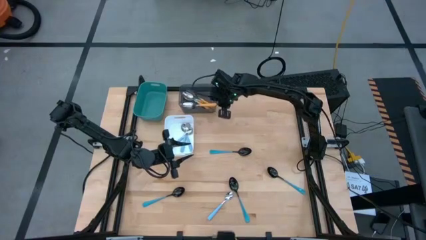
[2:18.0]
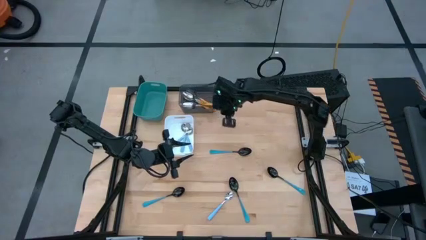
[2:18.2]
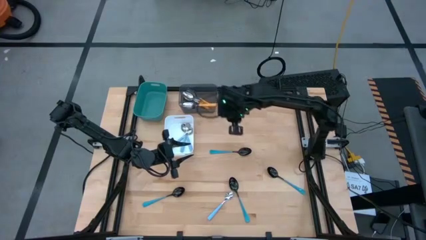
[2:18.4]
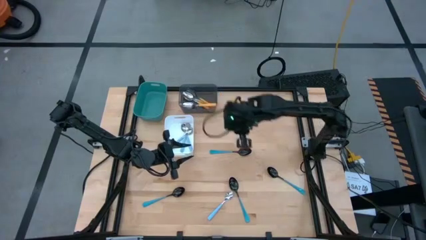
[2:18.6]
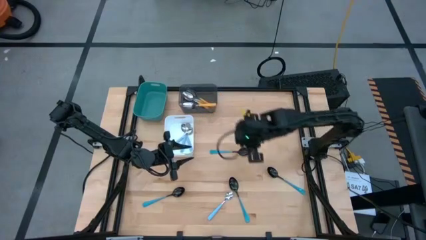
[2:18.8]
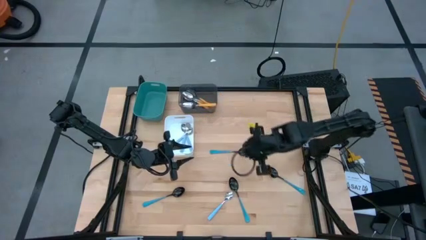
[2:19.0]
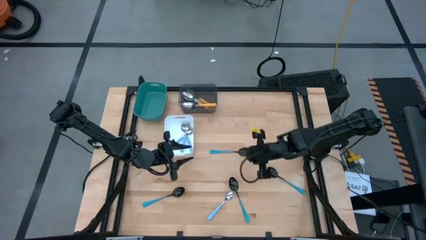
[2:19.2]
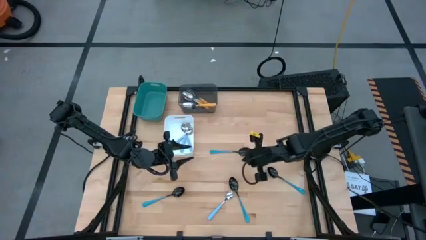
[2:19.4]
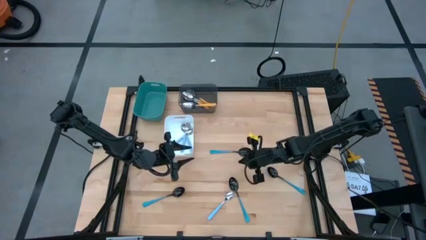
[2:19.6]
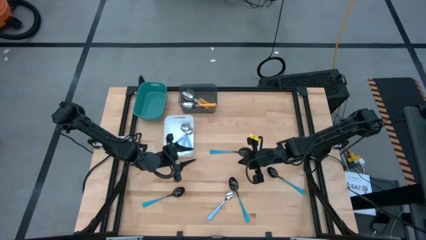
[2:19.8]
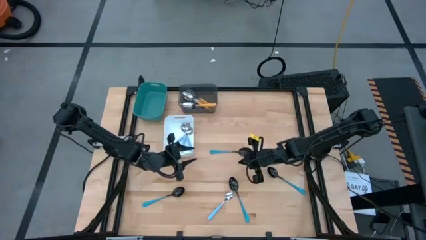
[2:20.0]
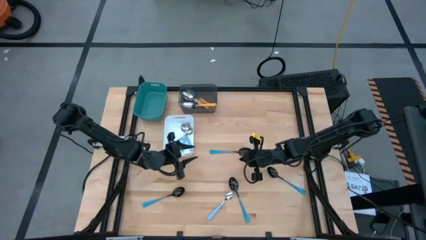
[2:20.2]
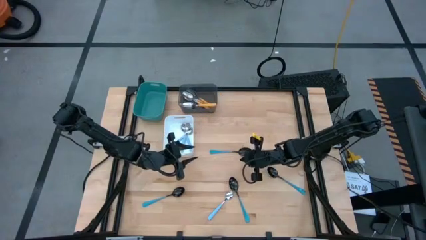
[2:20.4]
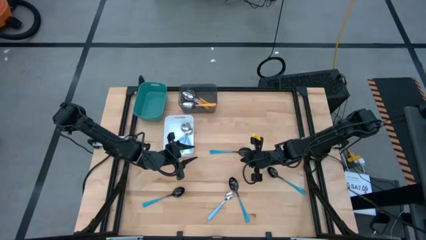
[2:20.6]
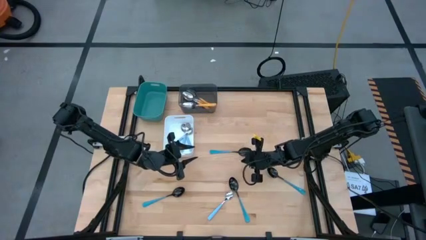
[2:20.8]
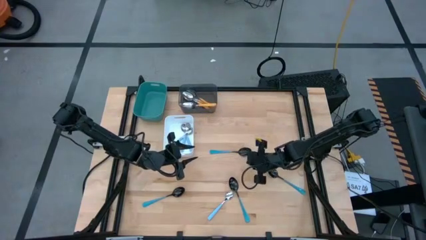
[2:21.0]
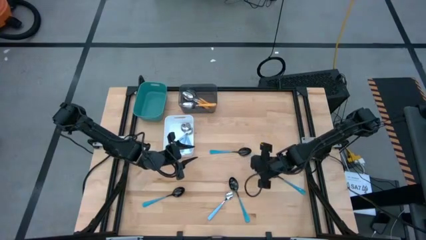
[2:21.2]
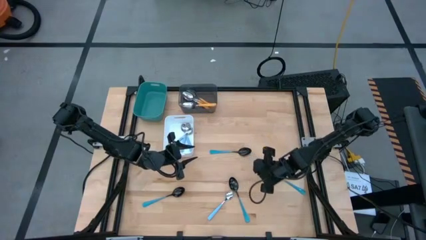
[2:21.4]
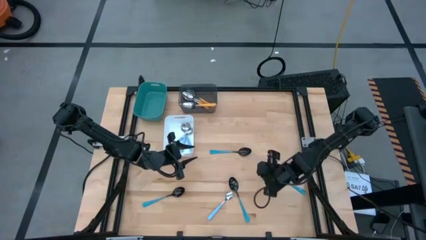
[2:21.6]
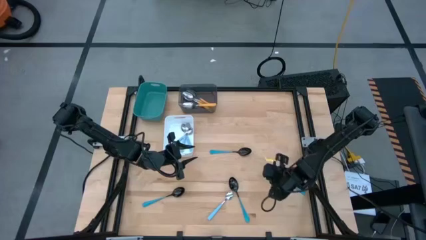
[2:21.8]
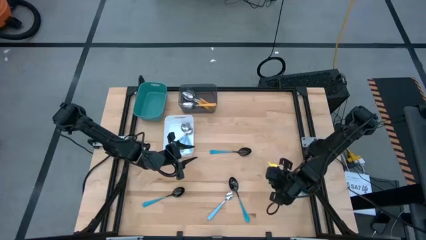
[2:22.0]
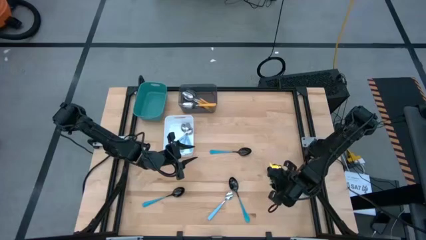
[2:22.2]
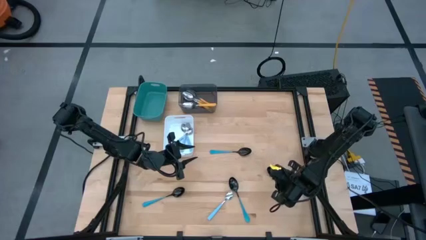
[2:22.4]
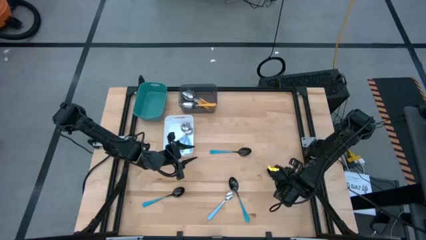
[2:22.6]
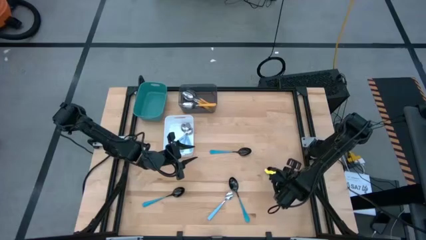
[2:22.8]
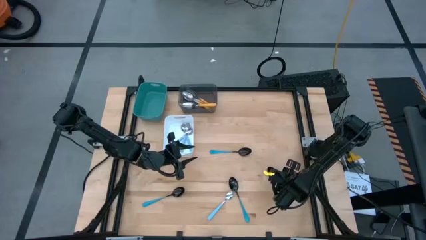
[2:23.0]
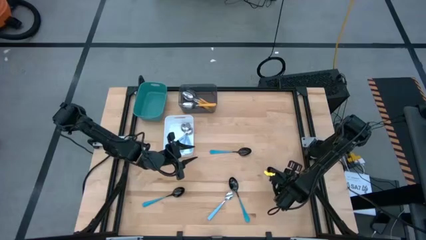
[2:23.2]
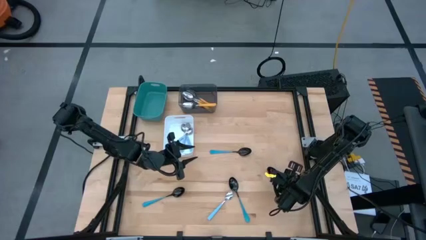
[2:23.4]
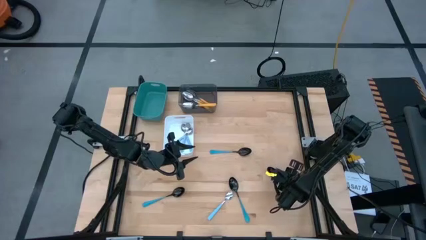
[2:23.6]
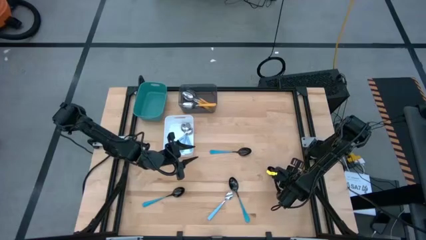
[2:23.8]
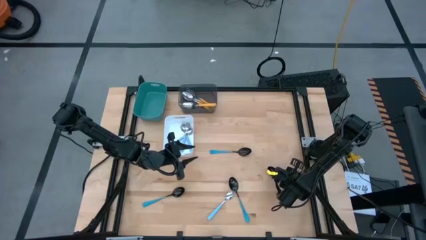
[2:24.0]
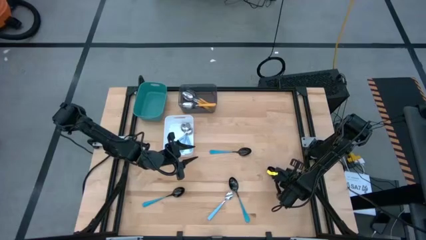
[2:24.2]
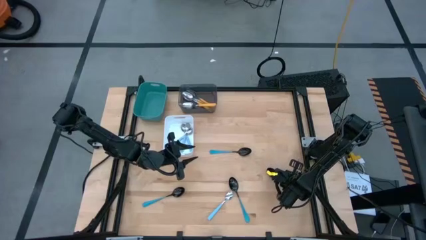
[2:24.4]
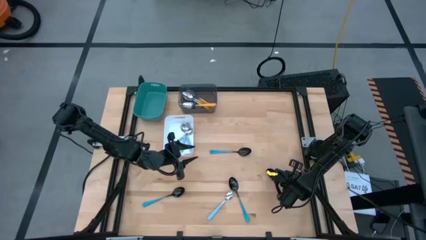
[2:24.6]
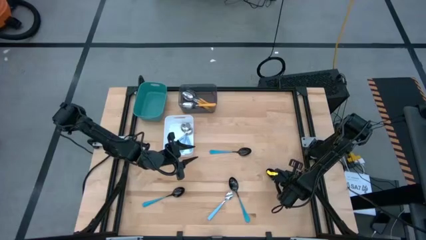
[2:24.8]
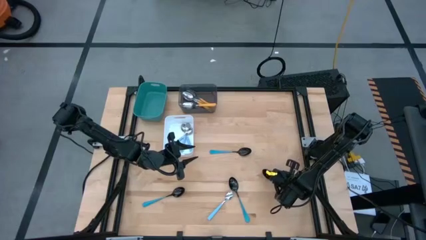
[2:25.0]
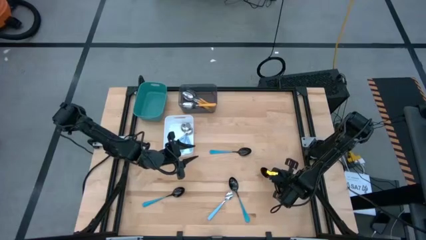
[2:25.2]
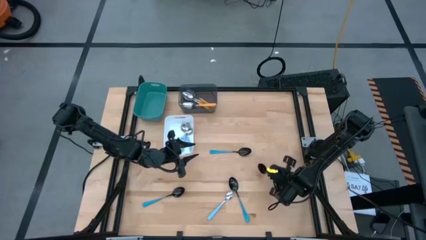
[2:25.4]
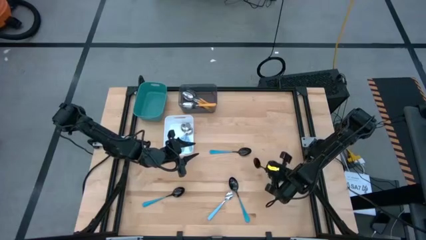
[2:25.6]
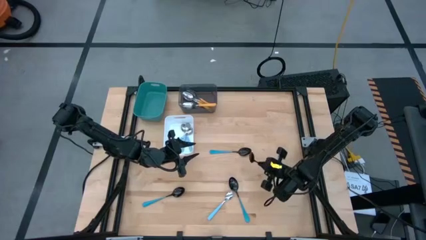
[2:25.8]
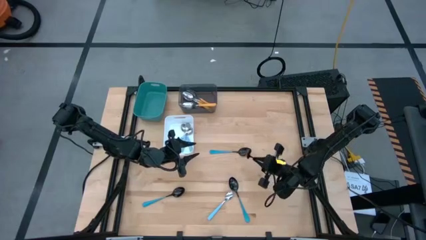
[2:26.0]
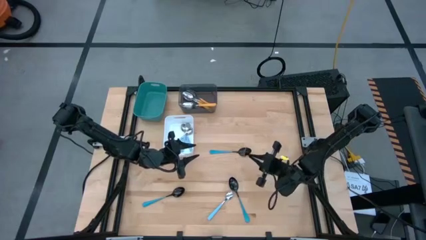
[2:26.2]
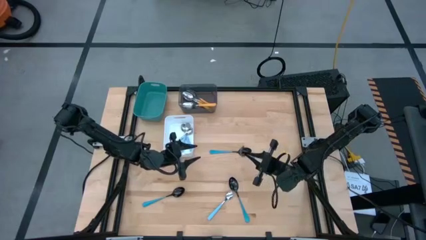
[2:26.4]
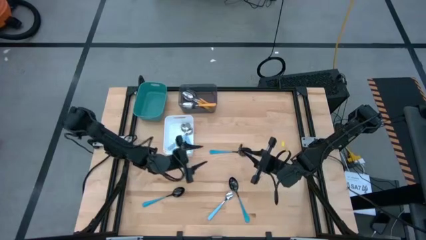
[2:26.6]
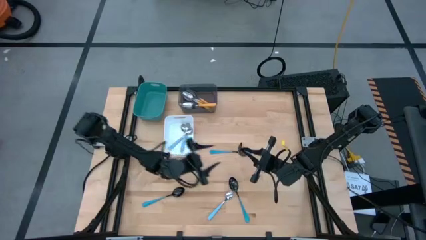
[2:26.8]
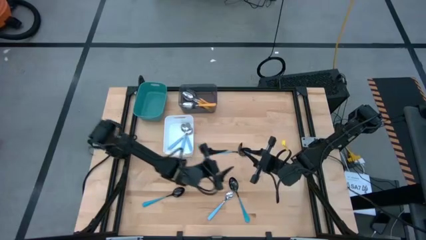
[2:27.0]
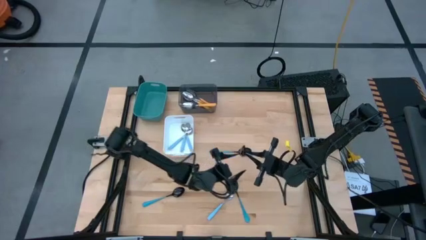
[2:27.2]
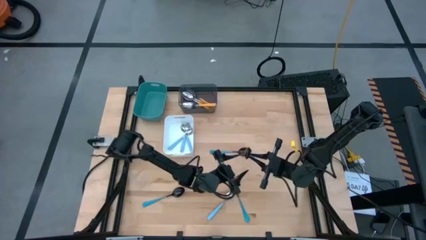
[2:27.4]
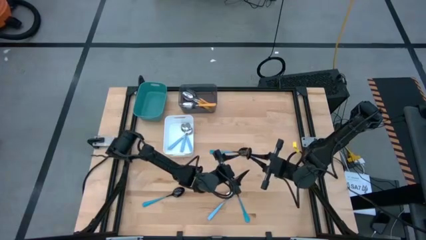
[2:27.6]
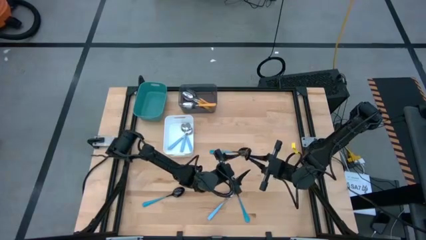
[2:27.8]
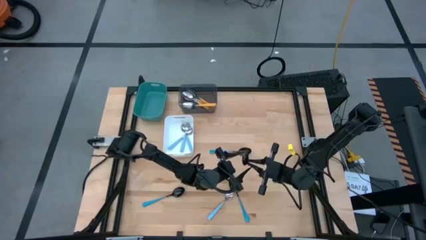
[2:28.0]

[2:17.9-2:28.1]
Task: Sort silverware by color (type)
Put the top right blue spoon into the green bin

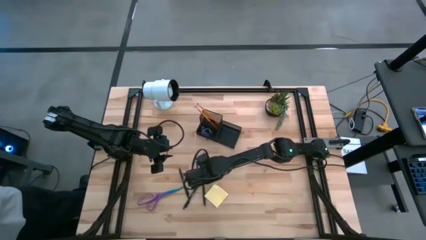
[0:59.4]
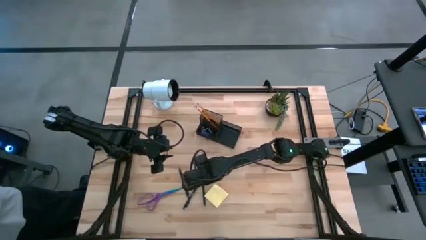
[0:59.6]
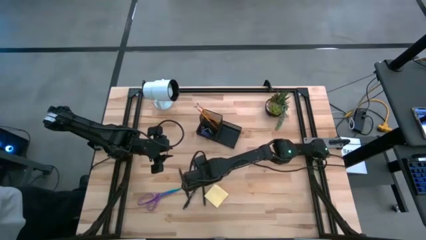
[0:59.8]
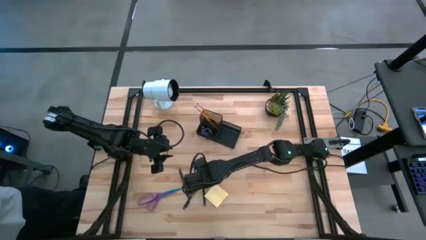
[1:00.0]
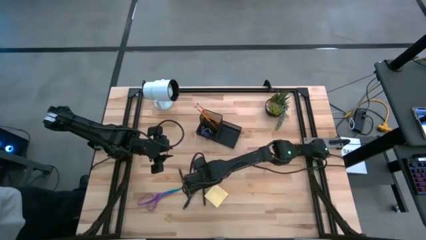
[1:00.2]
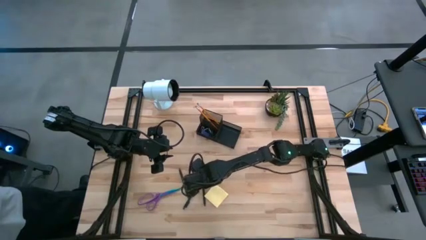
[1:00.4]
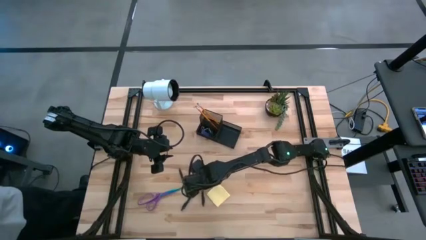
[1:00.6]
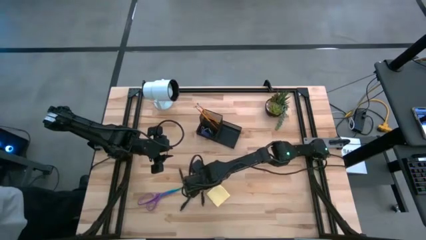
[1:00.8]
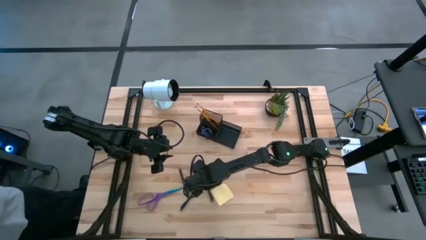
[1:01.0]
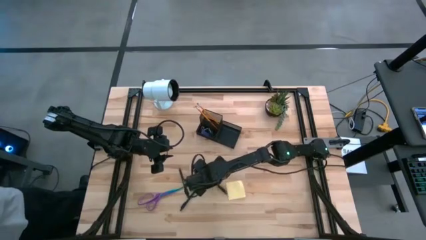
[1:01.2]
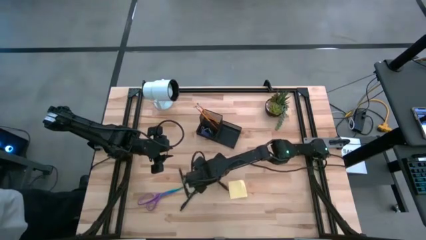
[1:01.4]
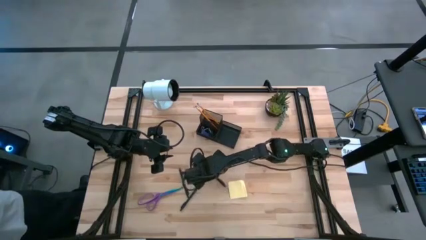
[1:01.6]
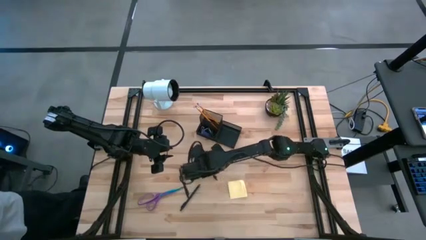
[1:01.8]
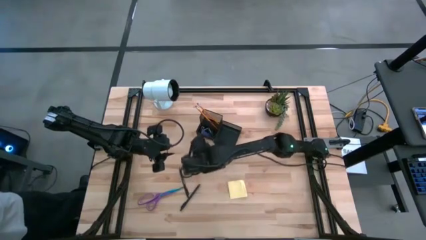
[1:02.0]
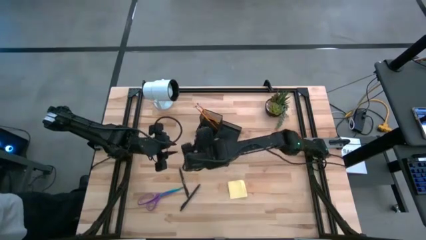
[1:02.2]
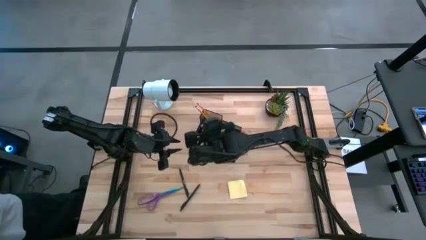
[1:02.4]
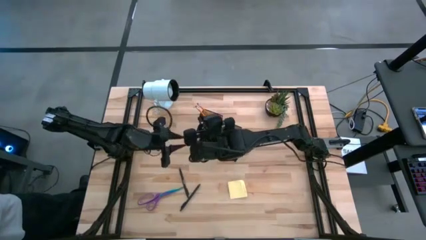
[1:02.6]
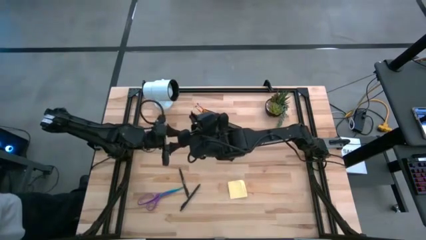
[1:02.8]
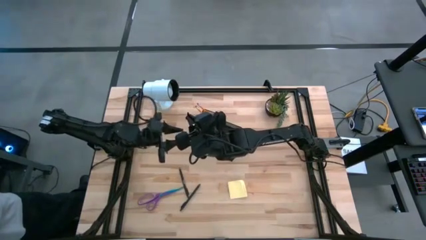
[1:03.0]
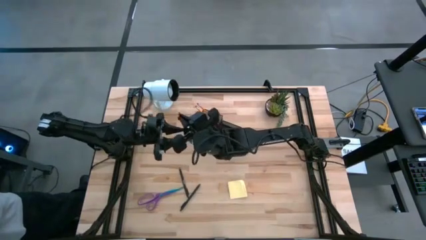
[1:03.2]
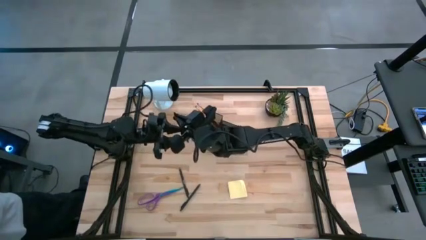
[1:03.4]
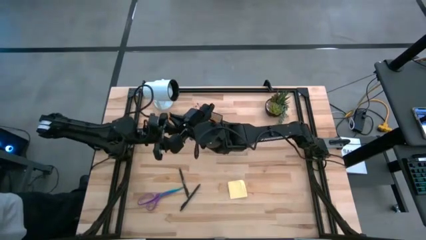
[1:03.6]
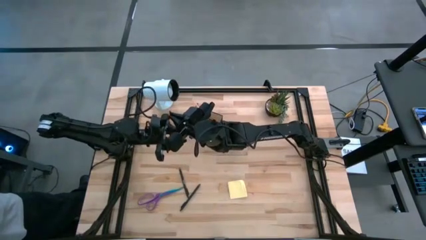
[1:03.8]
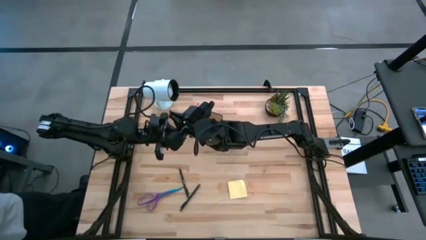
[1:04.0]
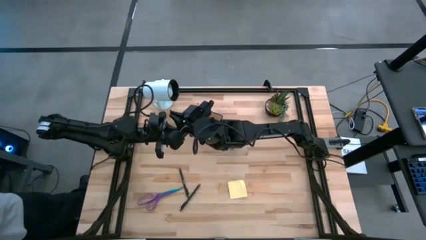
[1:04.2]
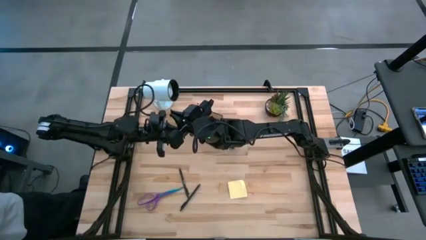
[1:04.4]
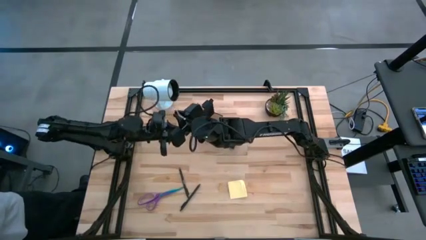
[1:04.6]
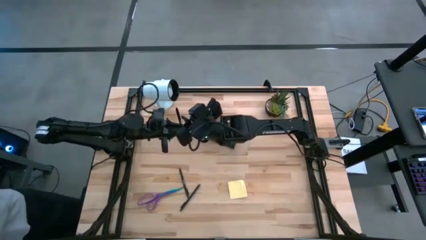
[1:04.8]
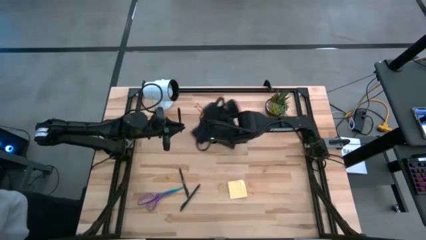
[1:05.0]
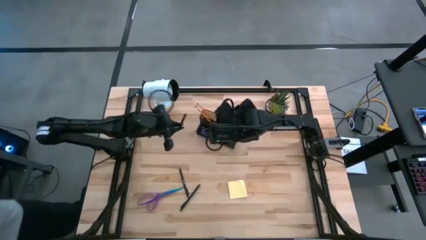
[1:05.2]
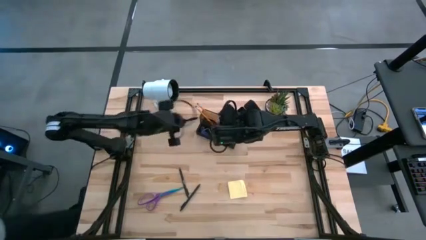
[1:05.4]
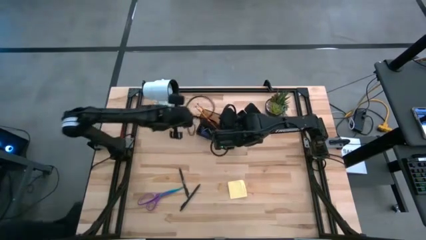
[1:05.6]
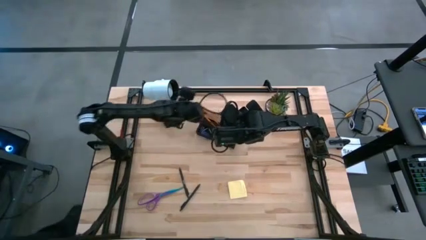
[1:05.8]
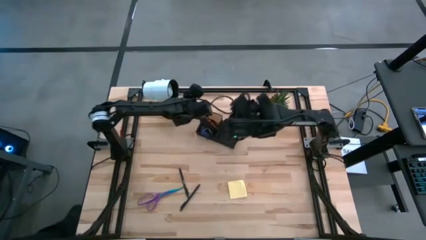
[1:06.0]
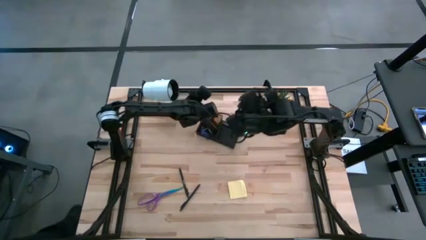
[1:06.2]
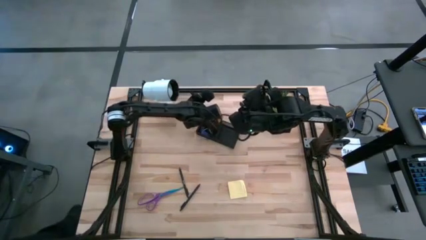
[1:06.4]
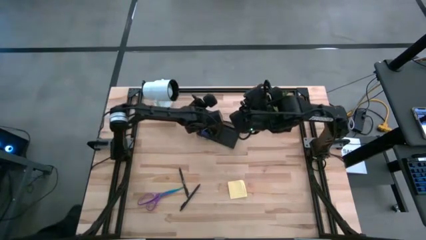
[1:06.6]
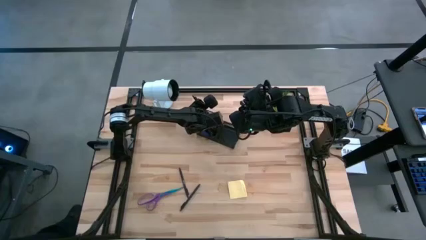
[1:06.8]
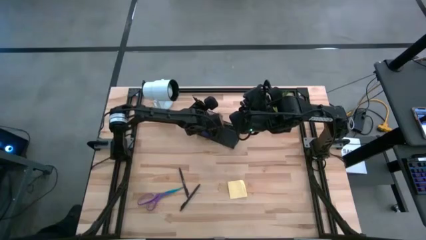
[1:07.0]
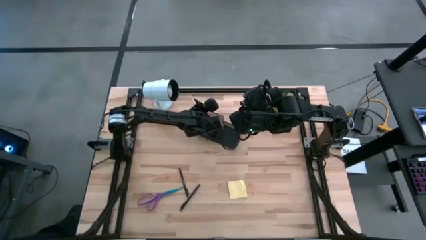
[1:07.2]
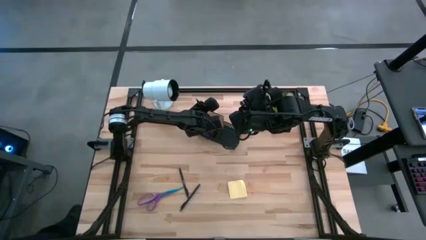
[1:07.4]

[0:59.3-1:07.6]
Task: Pick and place office supplies into organizer
Put the right black pen into the black desk organizer
